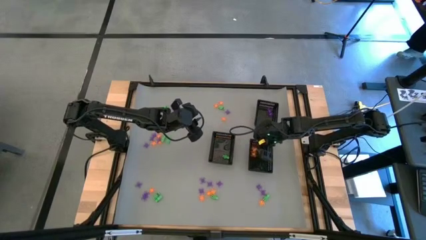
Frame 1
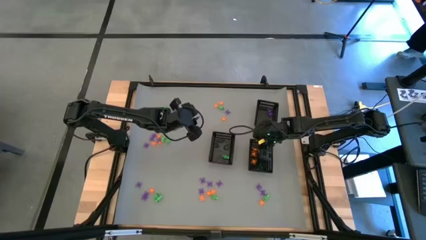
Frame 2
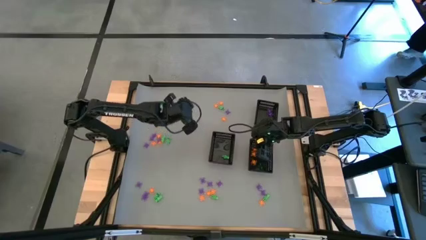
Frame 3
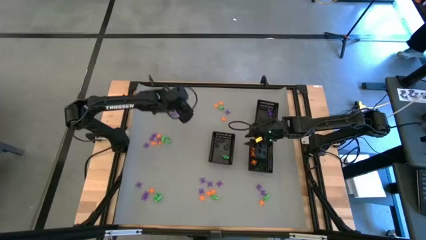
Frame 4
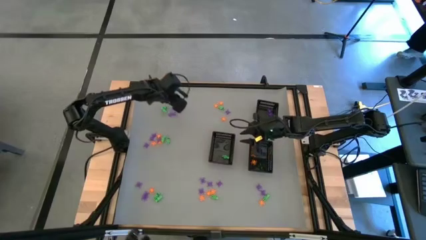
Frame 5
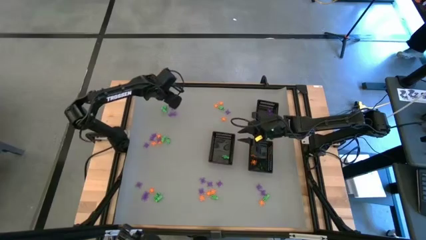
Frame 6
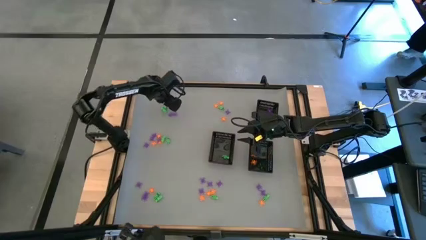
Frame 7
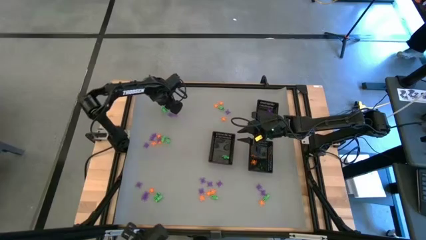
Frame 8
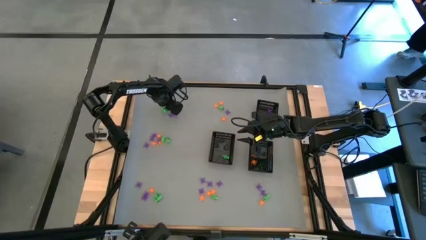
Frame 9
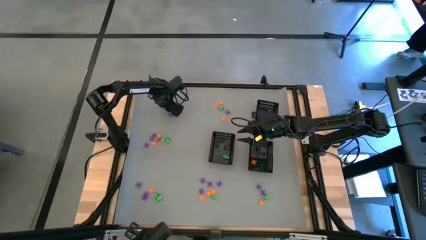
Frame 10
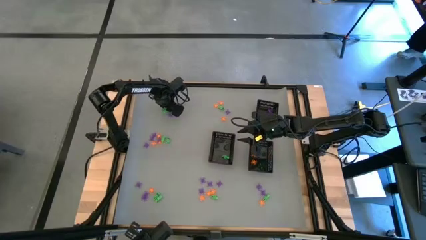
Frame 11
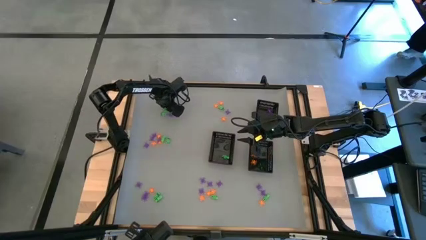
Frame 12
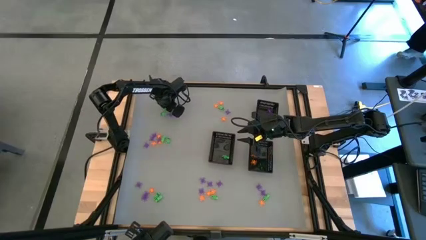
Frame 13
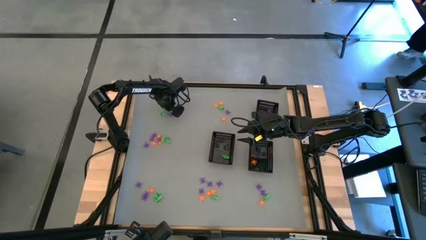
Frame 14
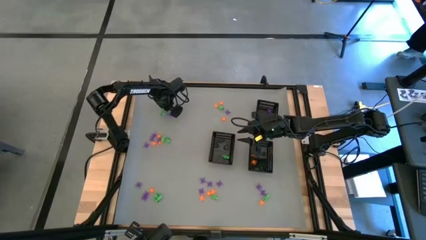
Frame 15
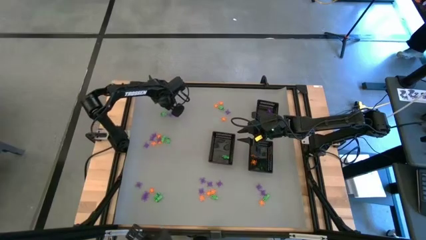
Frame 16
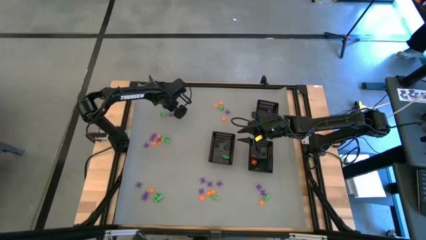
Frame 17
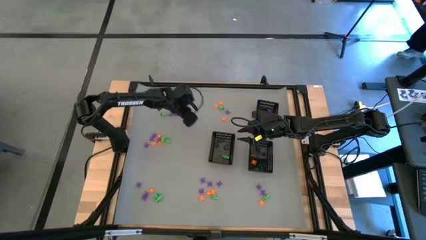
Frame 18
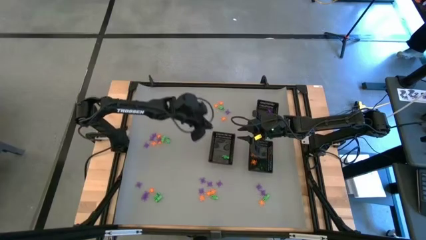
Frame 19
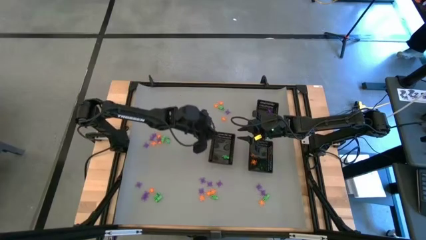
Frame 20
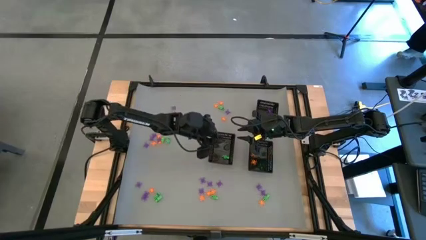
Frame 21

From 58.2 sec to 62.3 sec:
Task: Sort Halloween decoration
Put the green skeleton toy into the bottom left bin

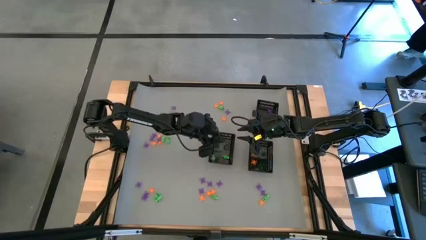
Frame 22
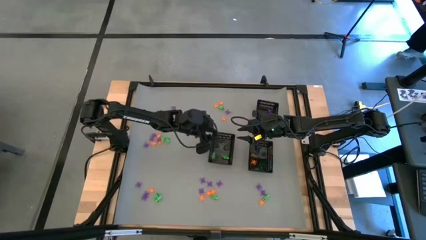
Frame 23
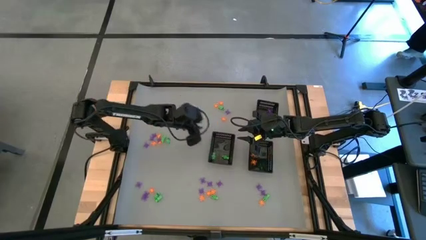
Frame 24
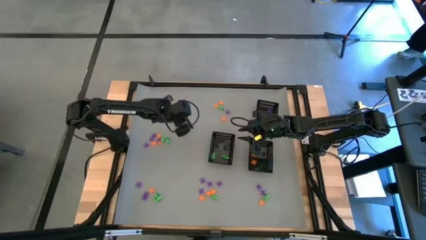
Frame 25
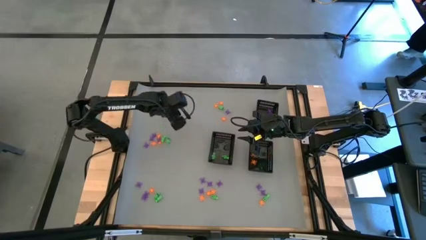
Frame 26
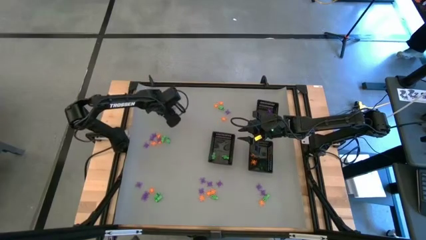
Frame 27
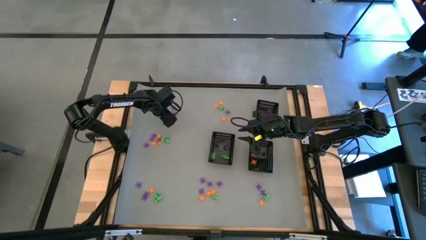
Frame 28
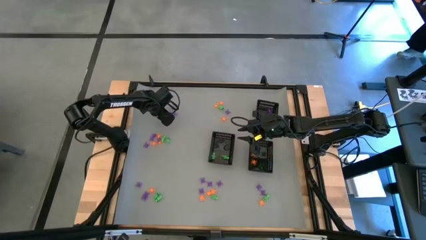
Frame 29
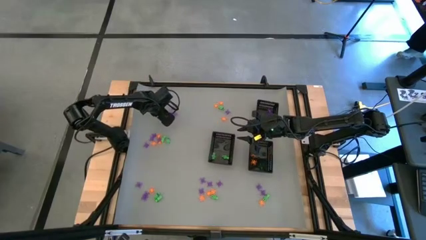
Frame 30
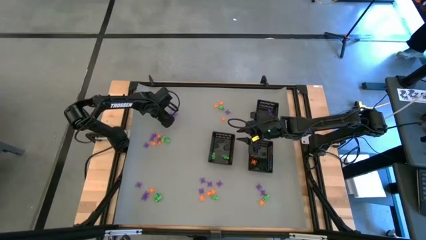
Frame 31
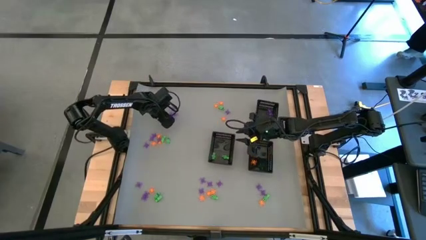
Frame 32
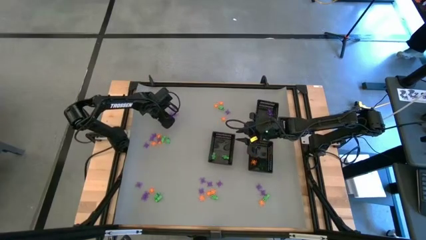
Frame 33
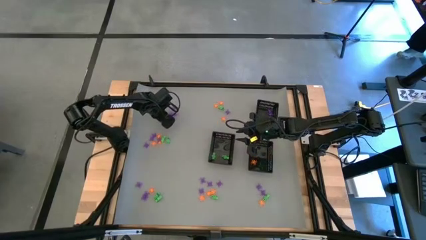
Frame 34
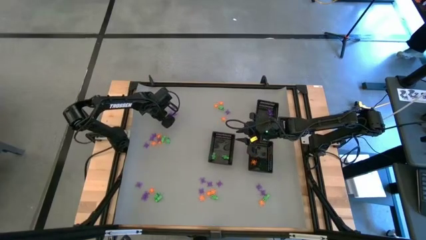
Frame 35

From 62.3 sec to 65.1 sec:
Put the green skeleton toy into the bottom left bin

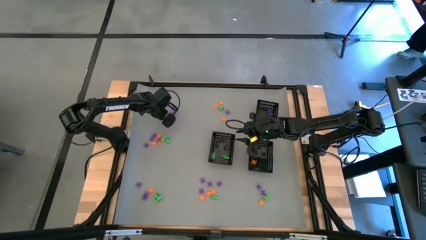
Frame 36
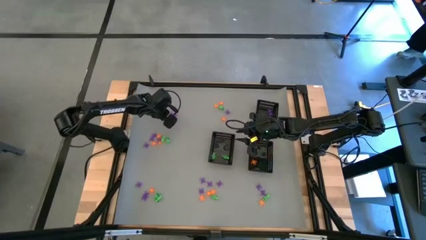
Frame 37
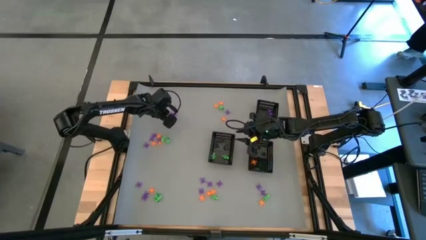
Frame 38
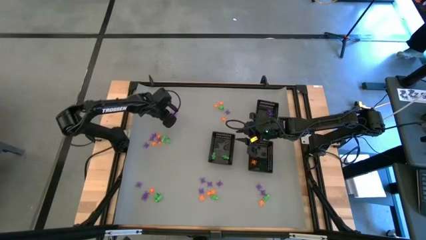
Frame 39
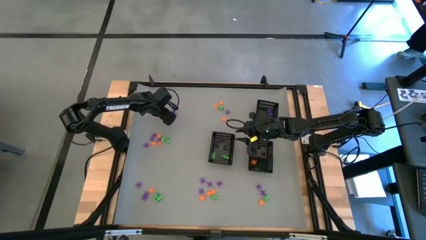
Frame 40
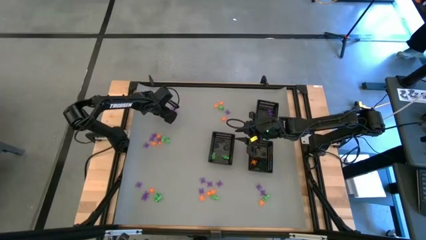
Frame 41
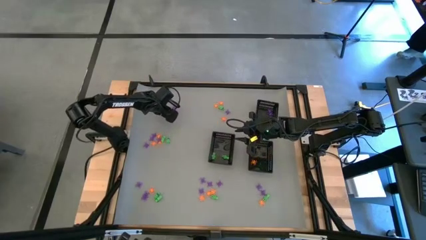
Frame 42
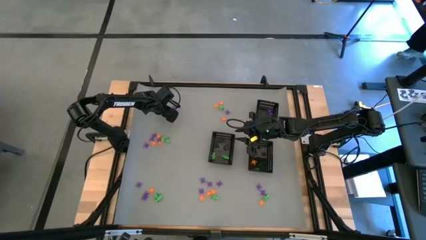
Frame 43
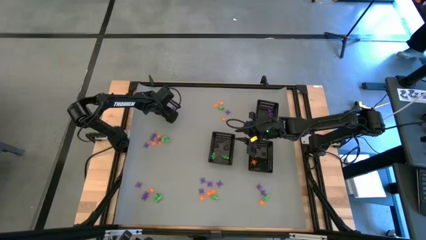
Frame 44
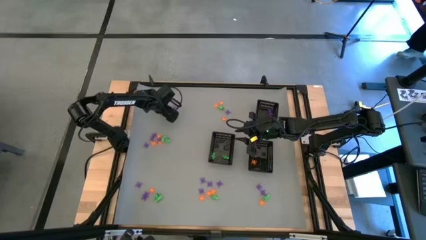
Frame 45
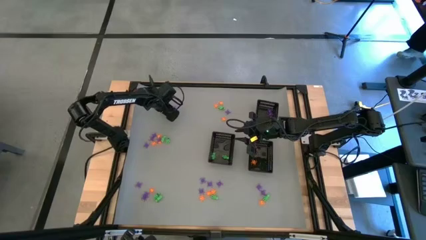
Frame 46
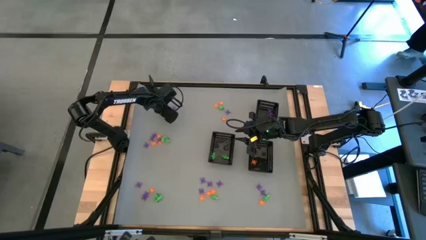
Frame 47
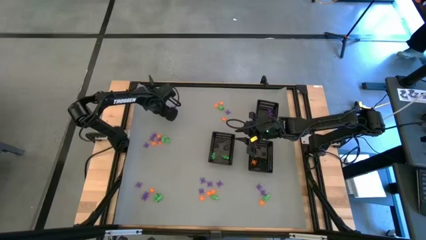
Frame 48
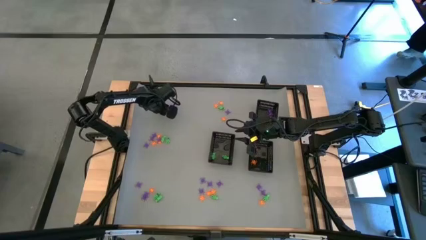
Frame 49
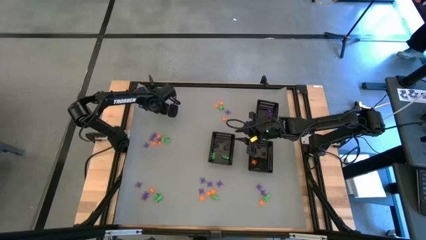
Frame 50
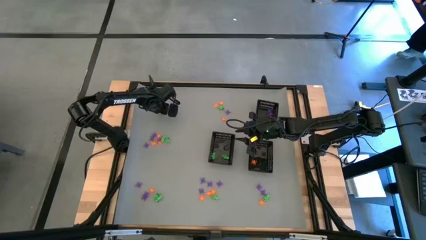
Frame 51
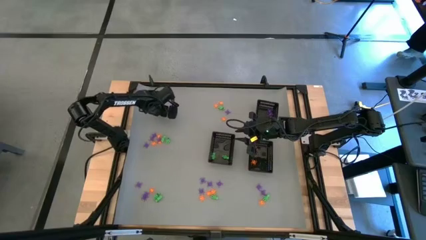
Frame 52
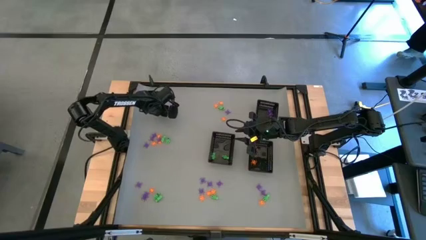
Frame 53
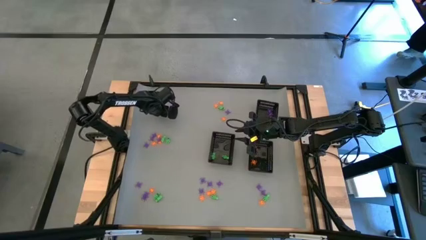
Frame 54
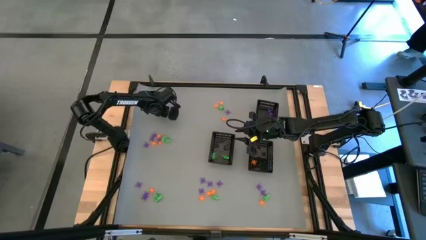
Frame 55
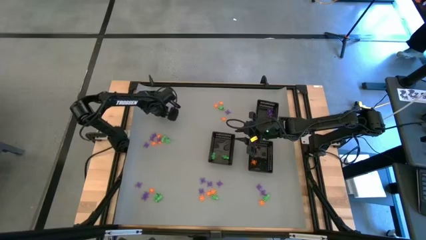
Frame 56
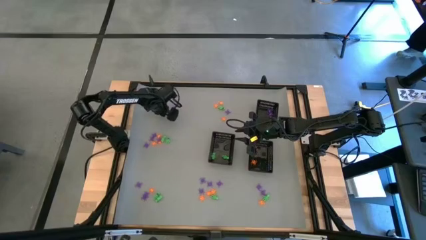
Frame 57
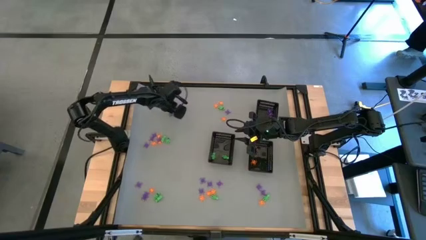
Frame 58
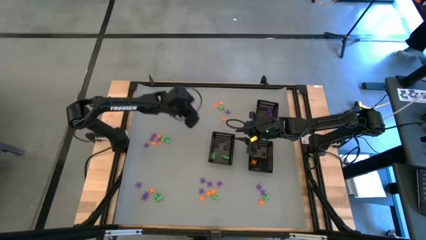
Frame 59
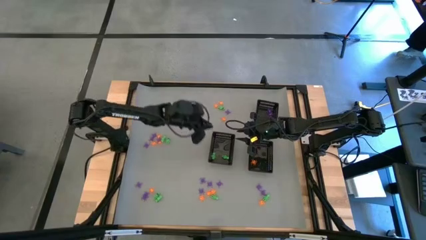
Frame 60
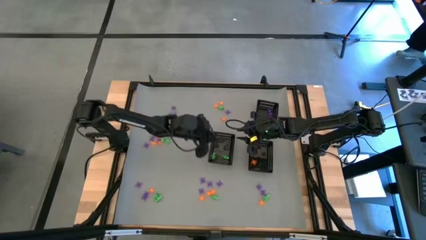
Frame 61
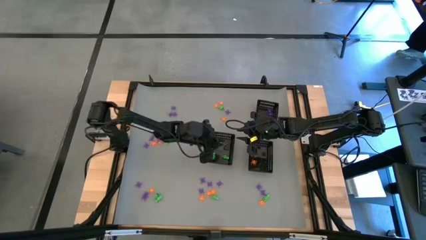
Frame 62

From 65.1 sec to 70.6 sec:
Put the green skeleton toy into the bottom left bin

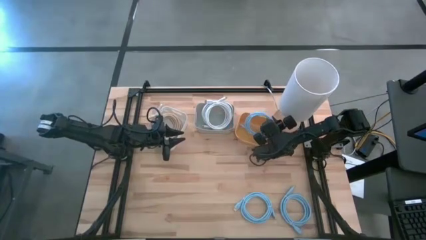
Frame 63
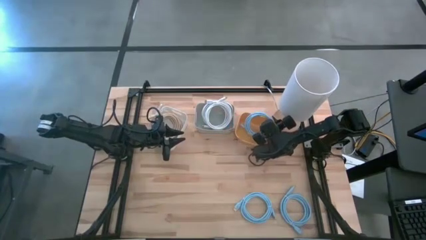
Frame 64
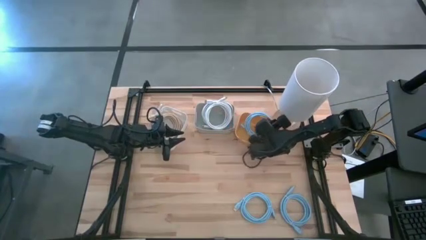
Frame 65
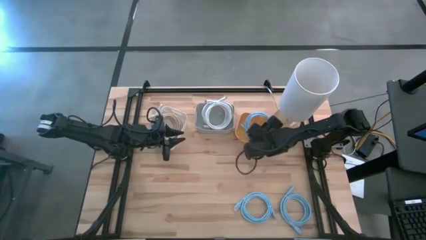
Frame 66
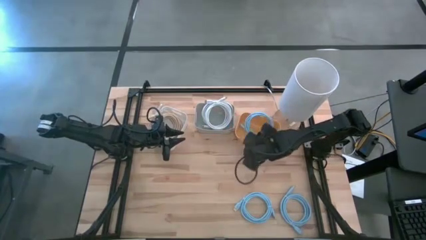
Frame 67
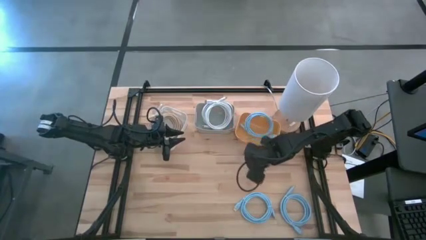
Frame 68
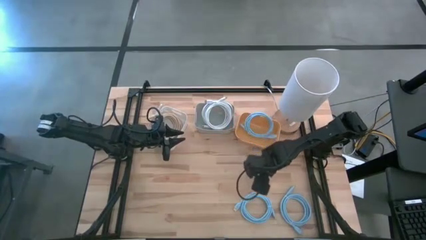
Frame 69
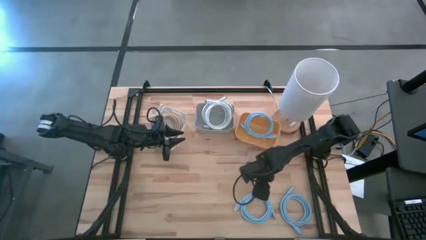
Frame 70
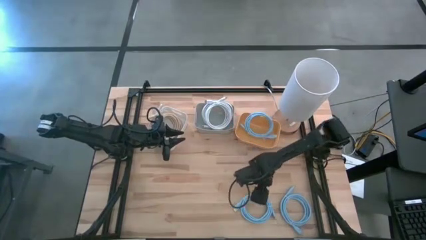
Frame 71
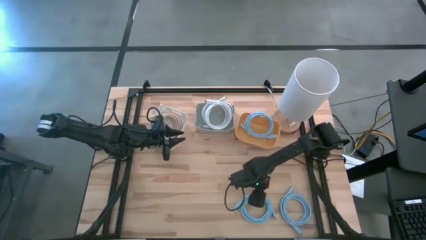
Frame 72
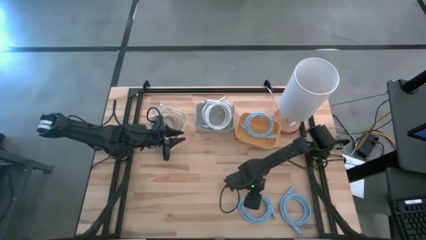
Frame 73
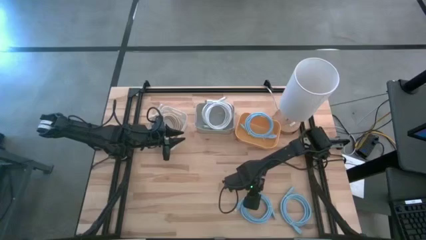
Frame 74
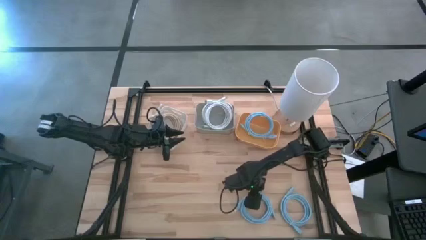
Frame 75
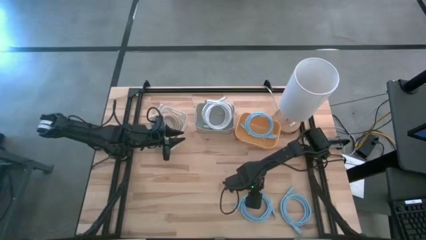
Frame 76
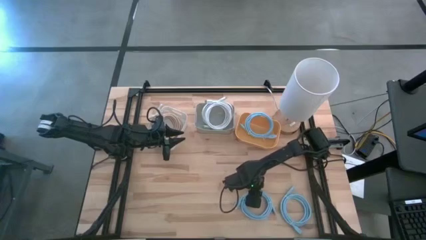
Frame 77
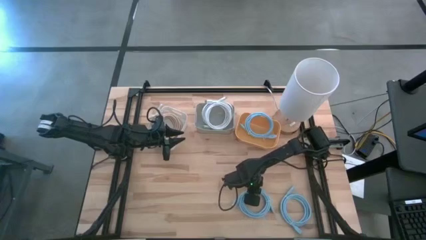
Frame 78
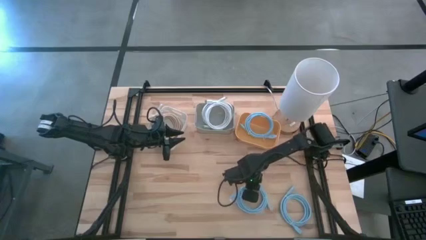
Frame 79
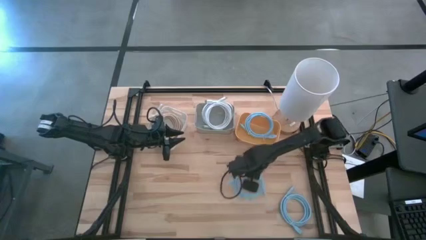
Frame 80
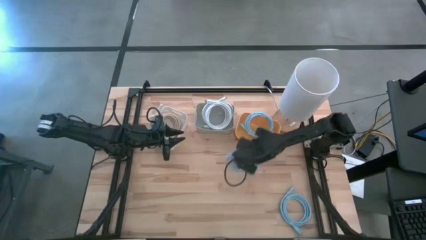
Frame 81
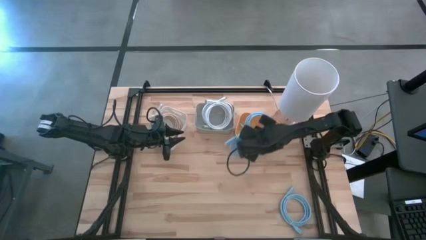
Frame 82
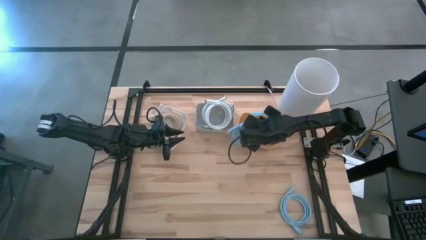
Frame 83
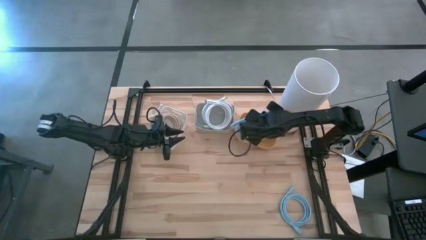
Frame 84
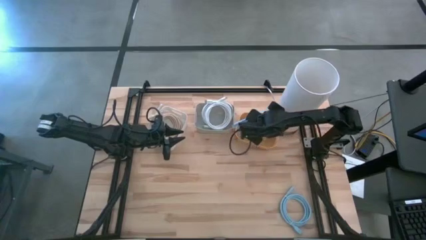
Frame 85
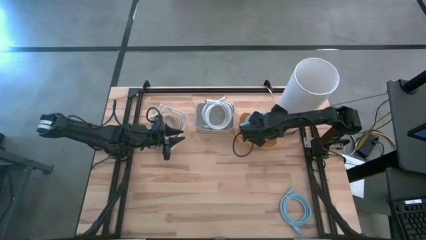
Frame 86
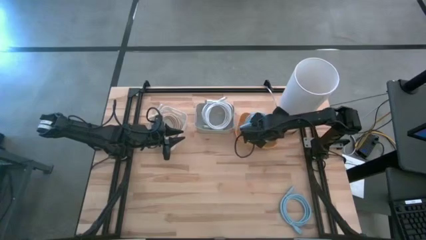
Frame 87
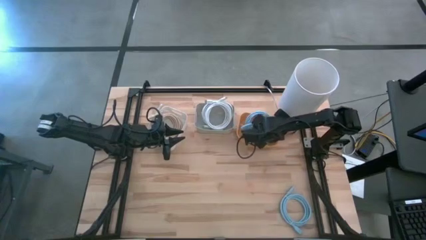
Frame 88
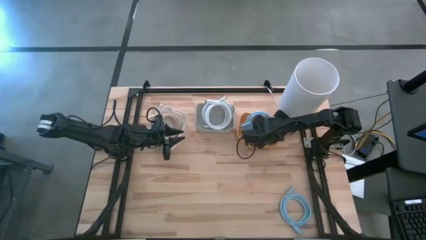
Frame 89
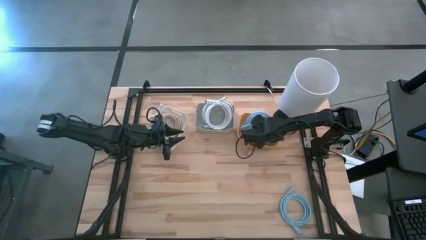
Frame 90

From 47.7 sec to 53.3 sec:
Task: Sort HDMI cables
Put the left blue HDMI cable into the orange bin
